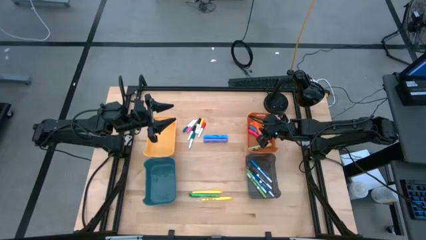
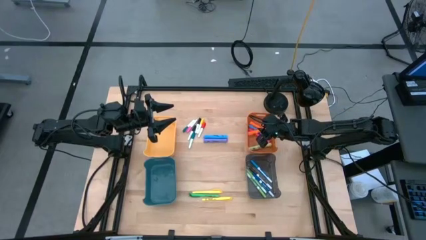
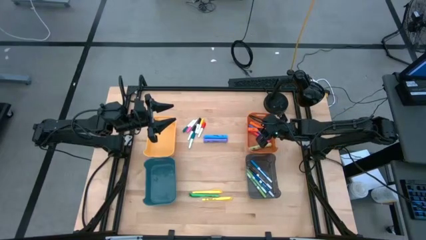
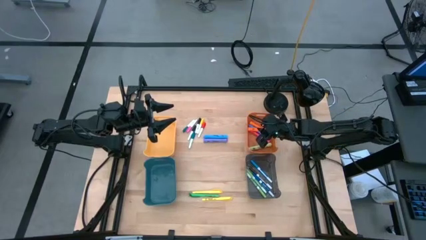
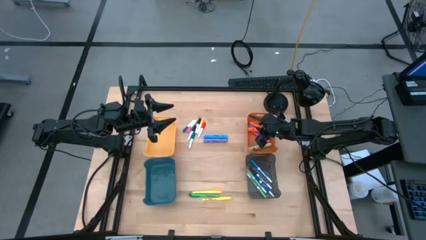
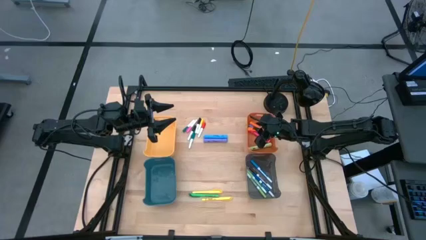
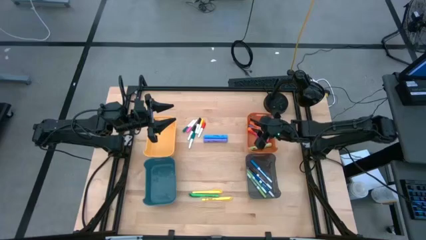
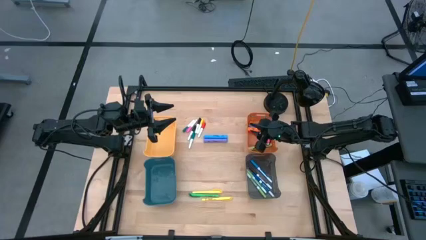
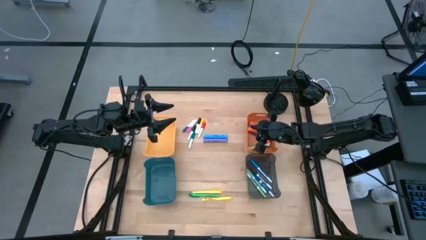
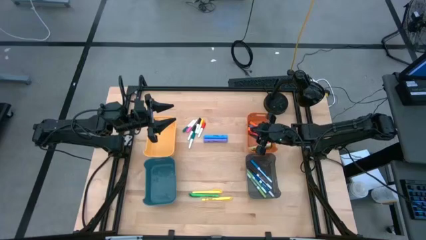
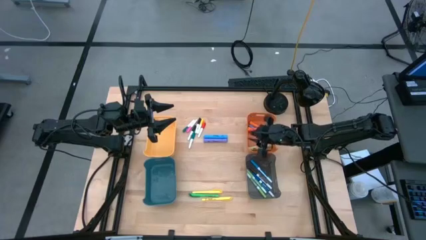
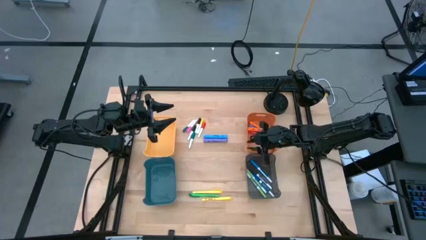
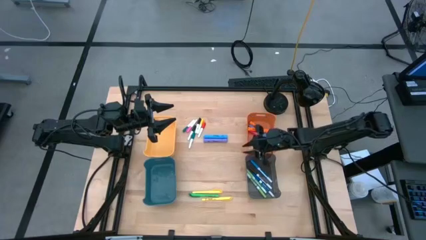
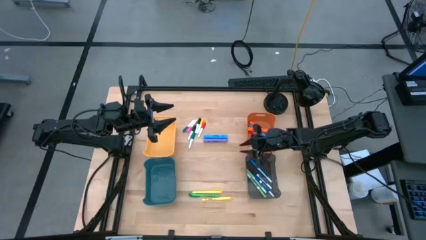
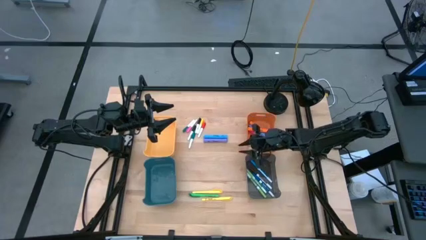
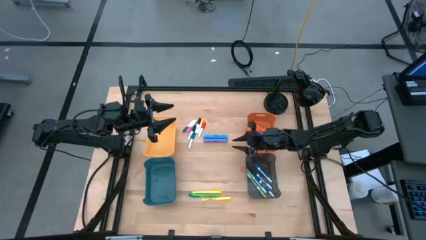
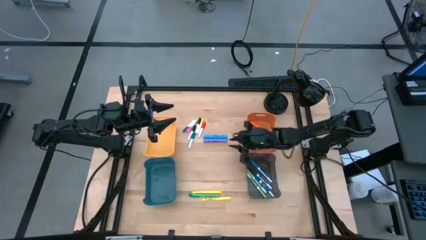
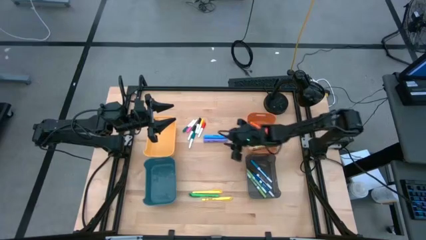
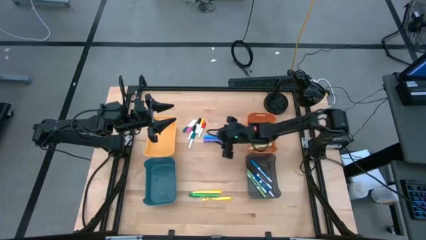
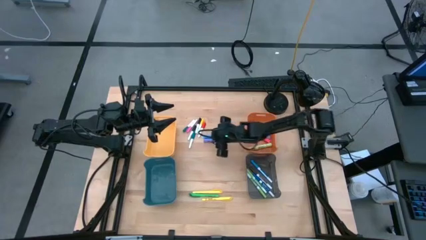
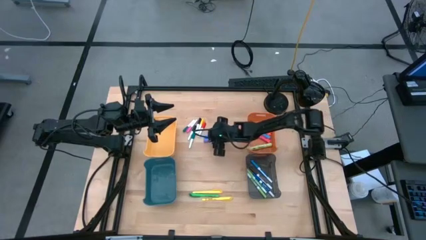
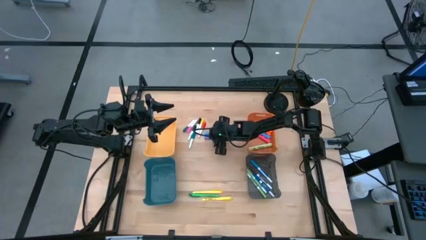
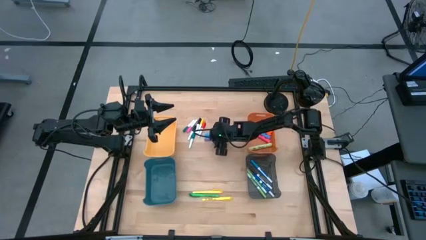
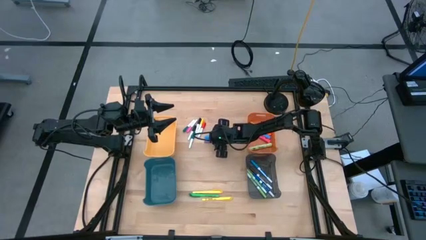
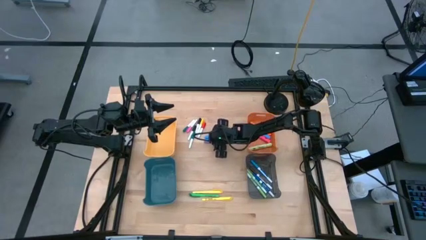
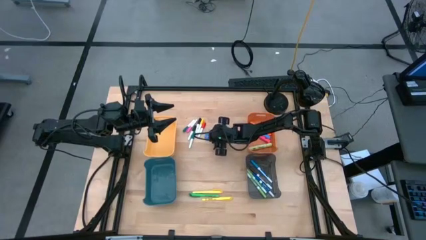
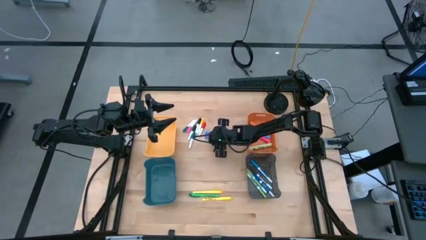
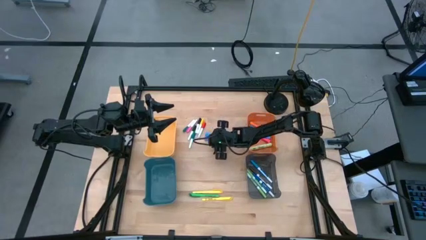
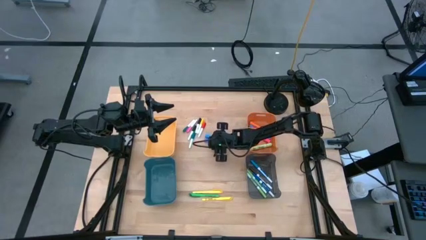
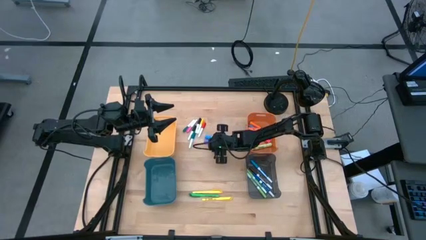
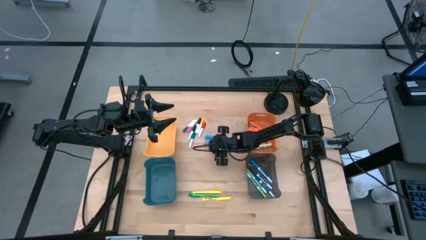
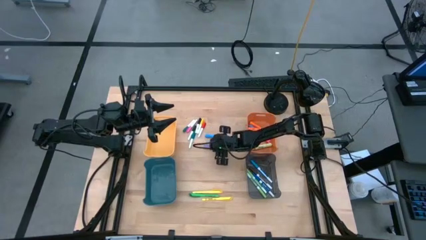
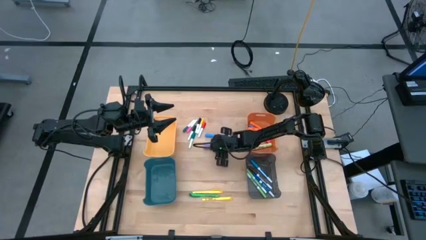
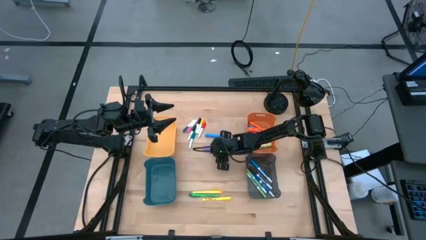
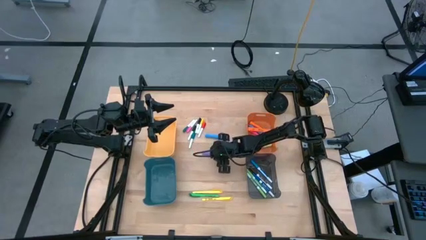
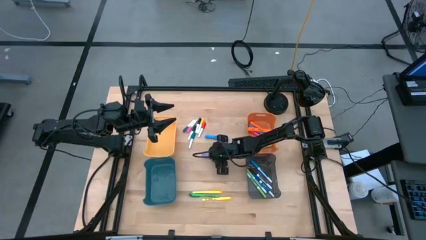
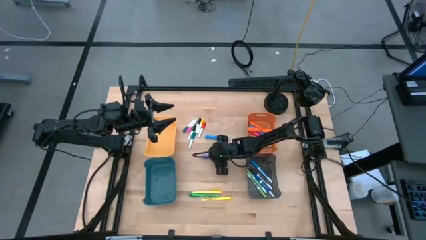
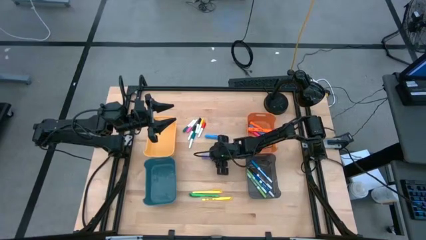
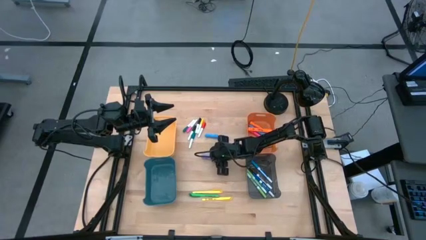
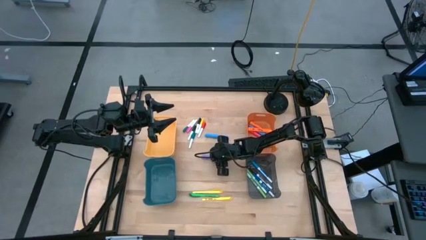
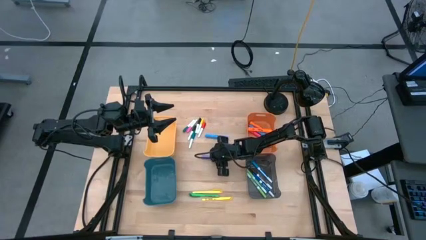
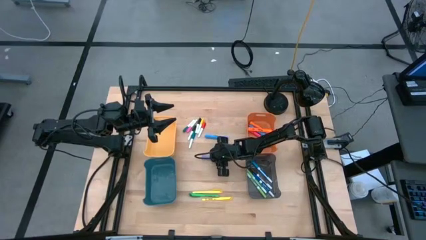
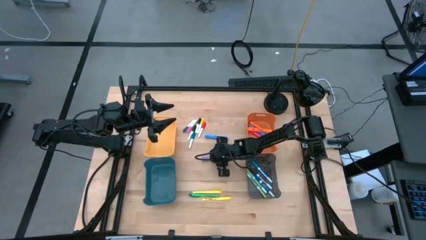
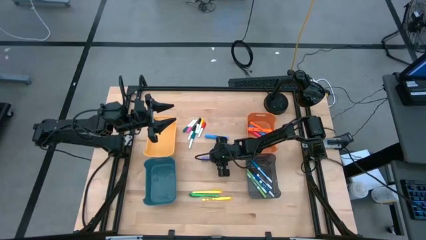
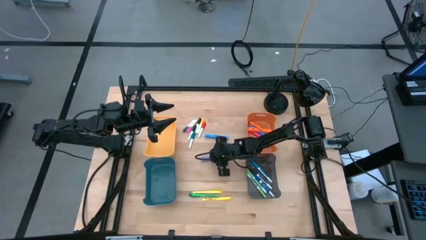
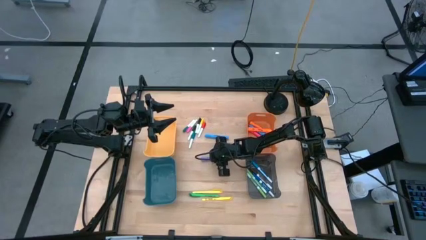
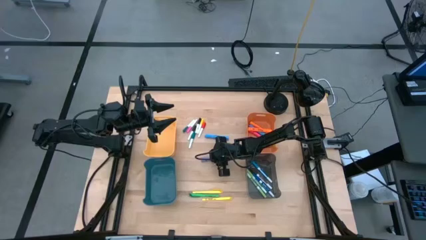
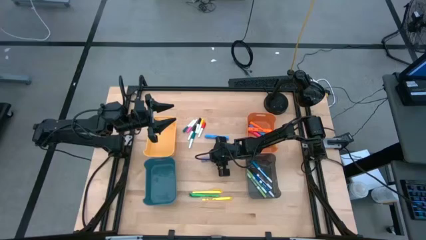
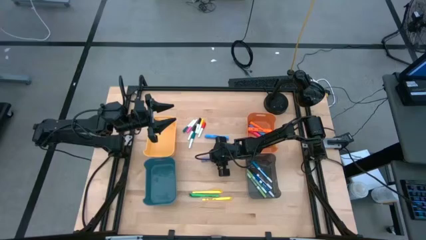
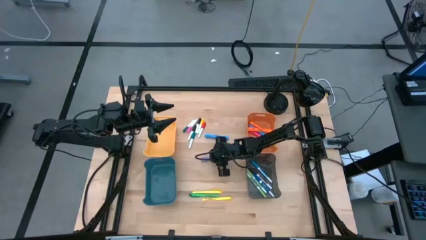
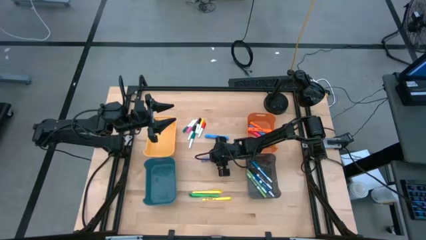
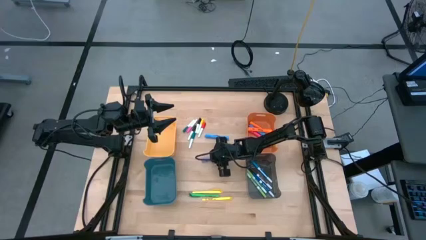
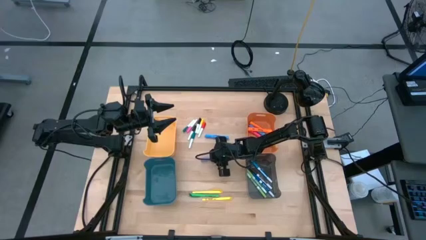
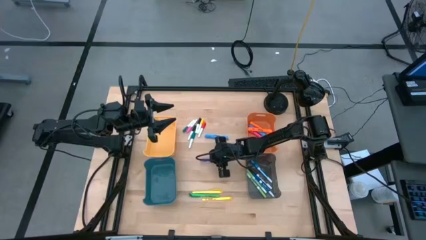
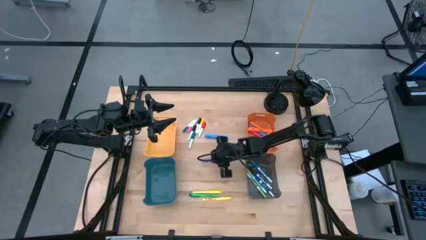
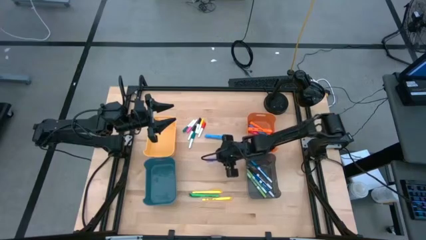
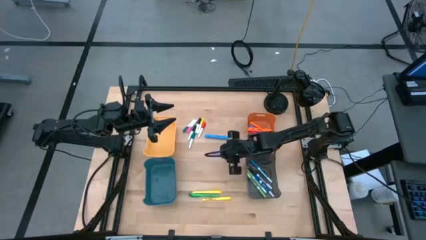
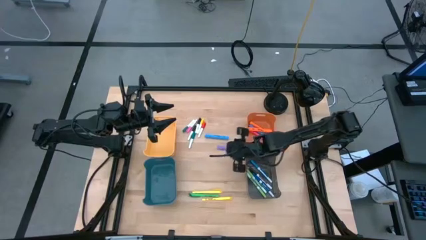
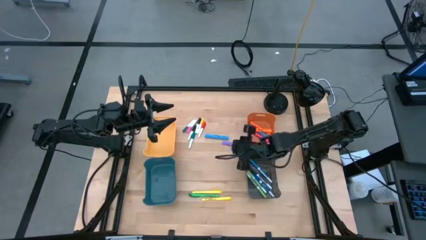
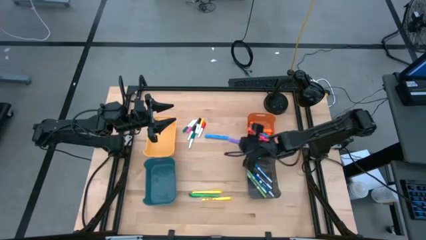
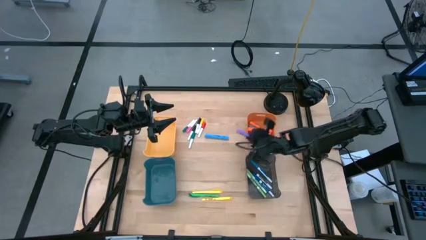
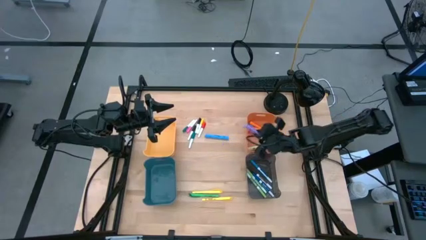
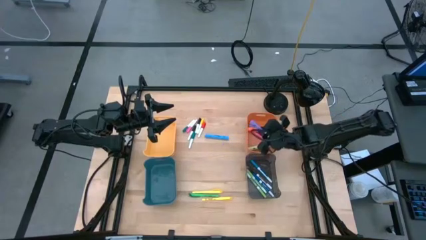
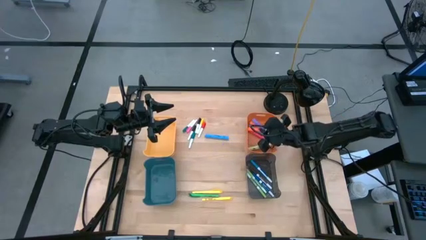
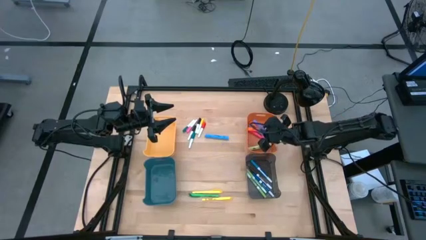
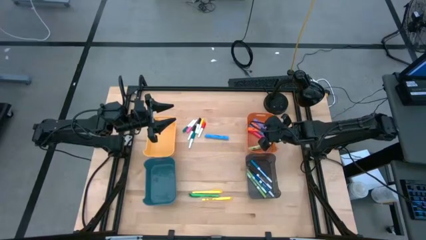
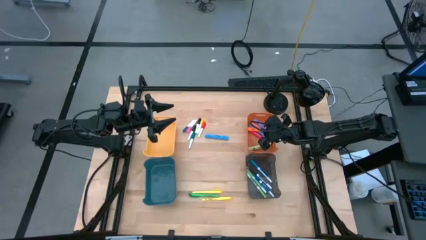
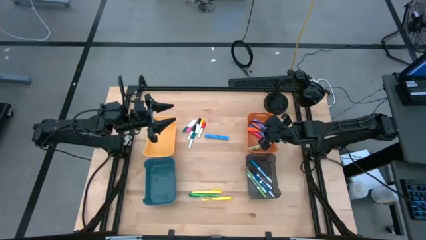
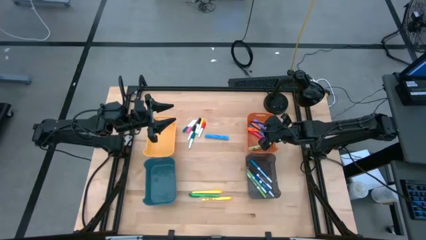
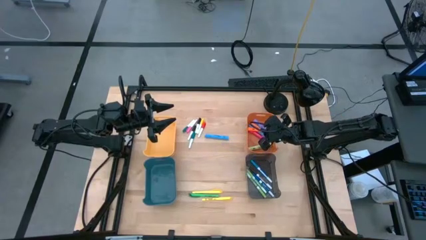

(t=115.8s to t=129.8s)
Task: Pick & Place Markers
Put the purple highlighter into the orange bin

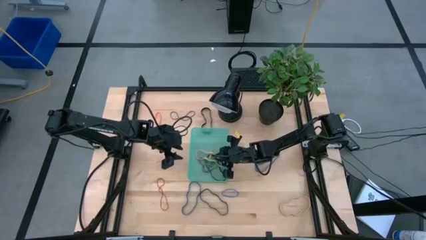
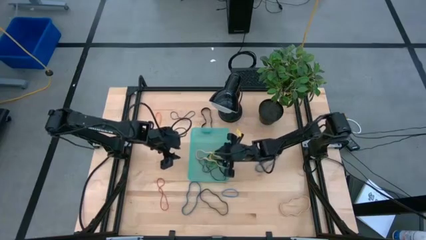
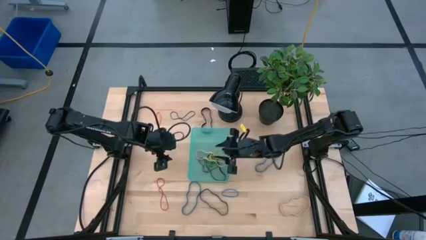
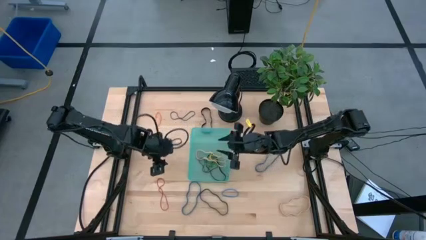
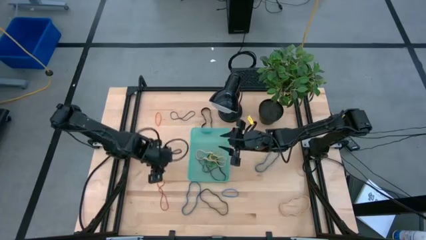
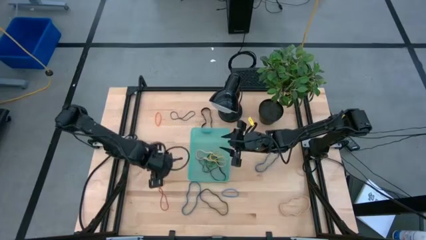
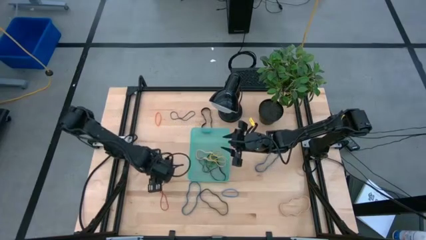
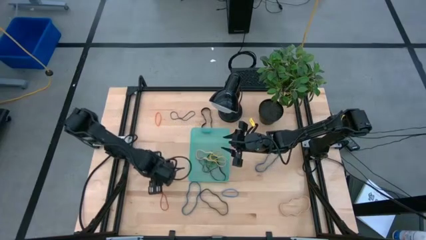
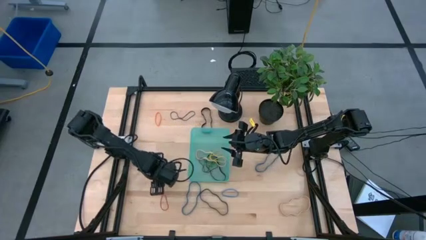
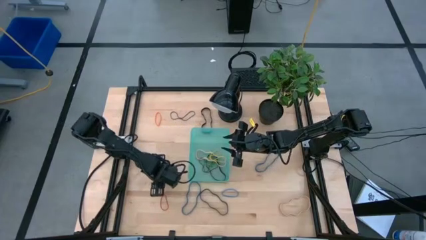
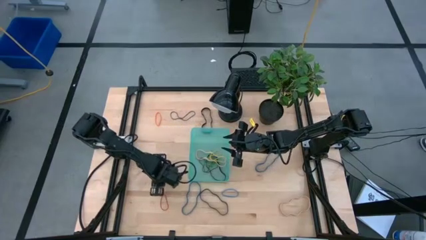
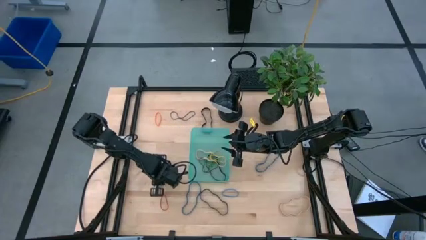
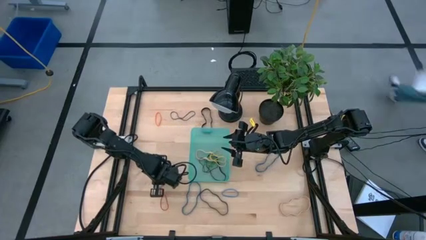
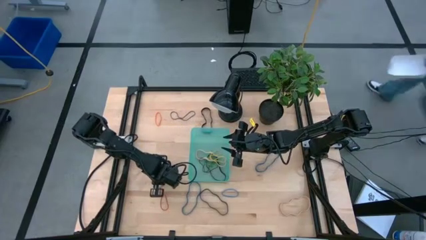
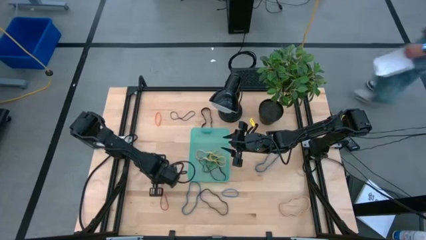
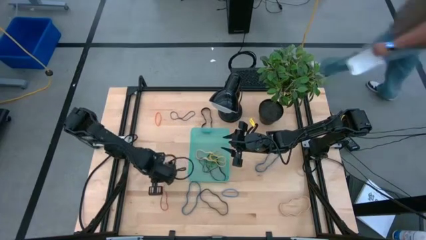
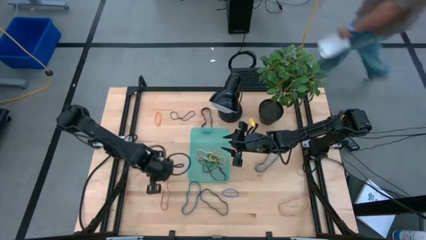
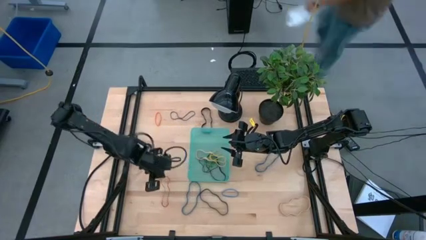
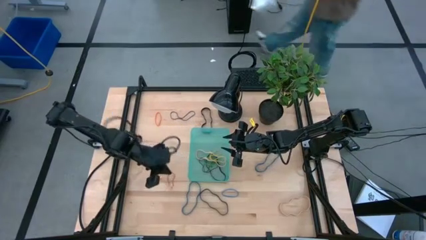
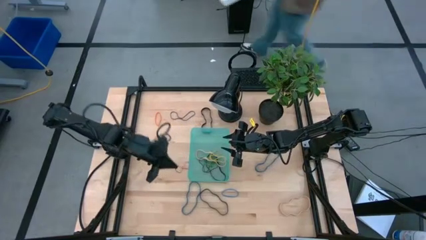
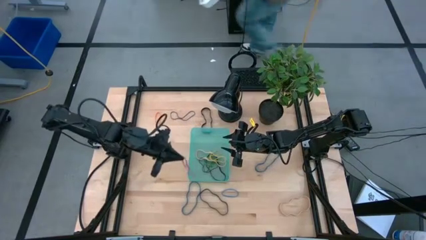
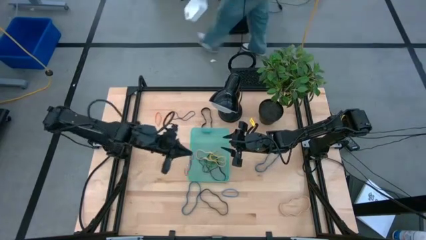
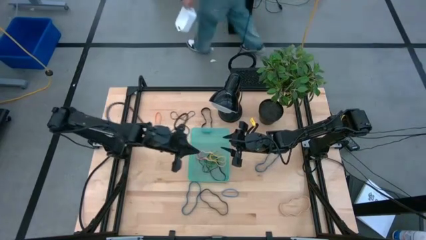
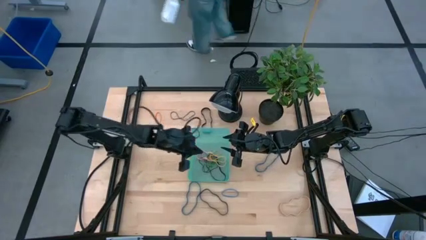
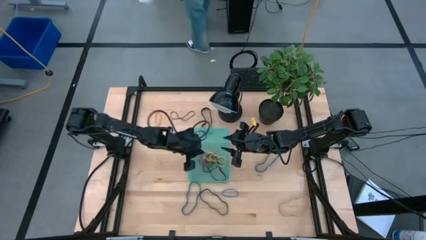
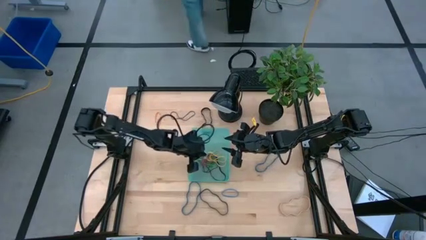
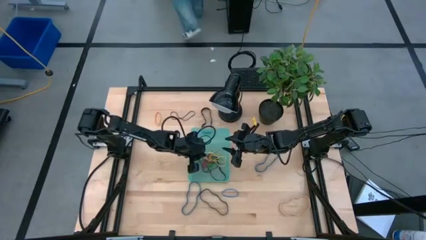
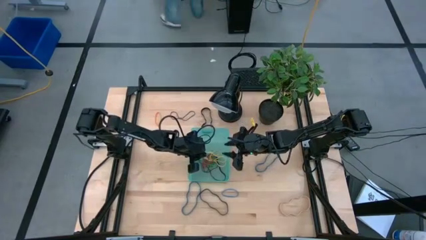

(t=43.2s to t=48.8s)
Task: Pick and place rubber bands into bin
Put the red rubber band into the basket
